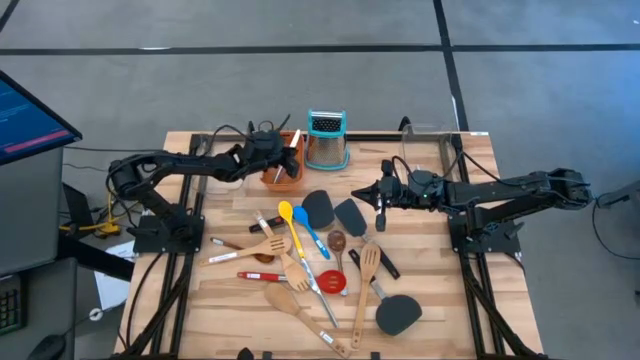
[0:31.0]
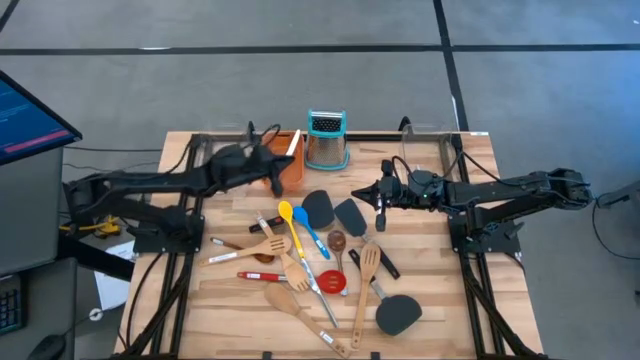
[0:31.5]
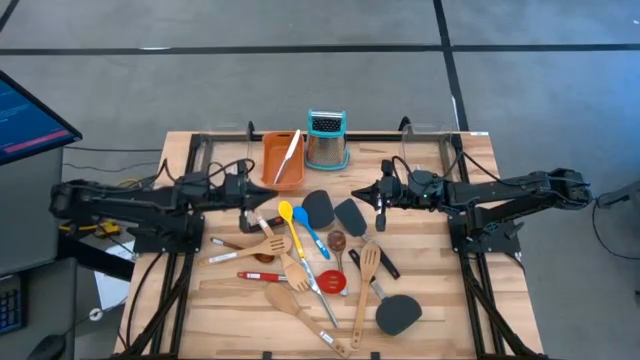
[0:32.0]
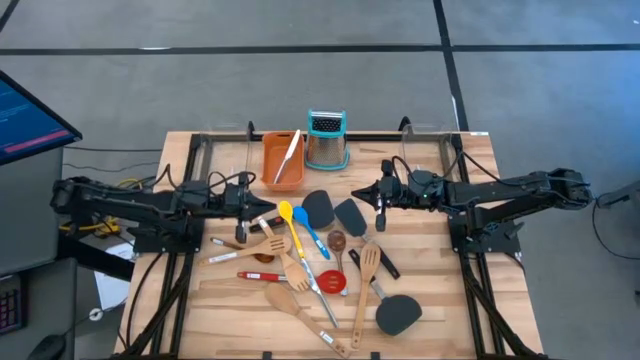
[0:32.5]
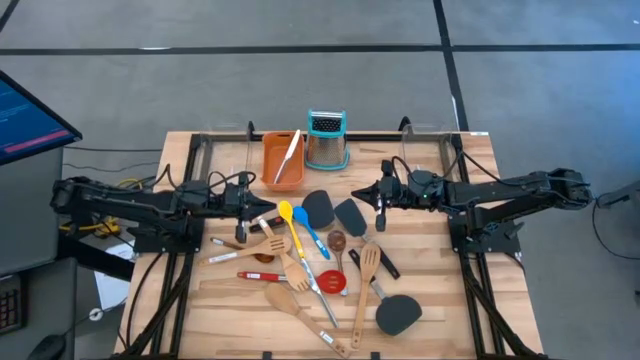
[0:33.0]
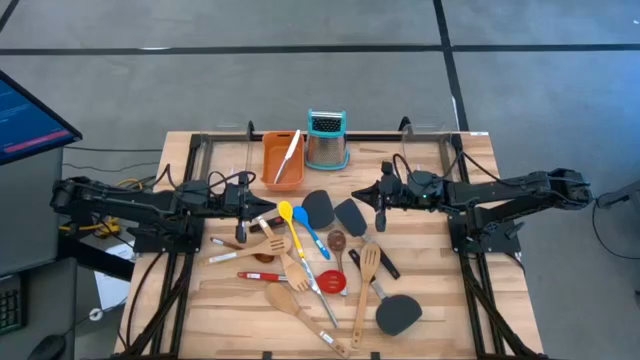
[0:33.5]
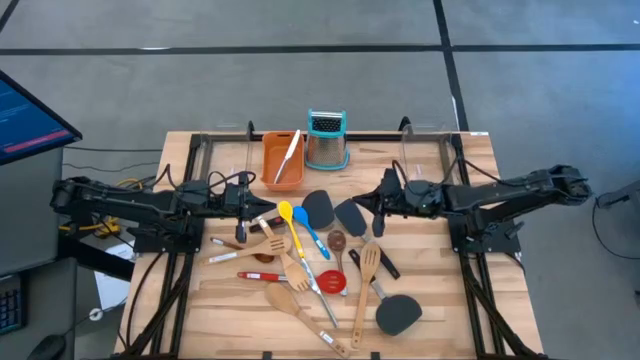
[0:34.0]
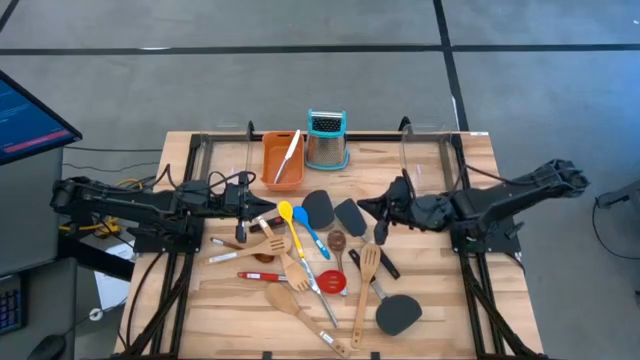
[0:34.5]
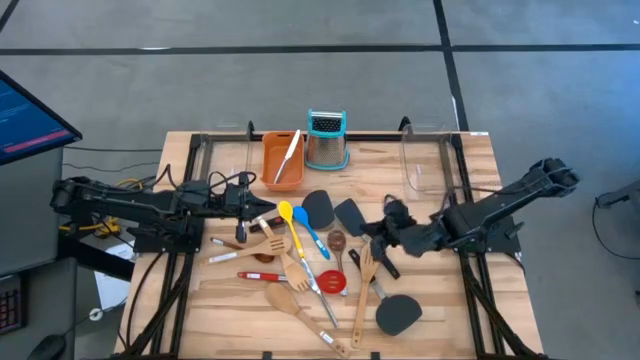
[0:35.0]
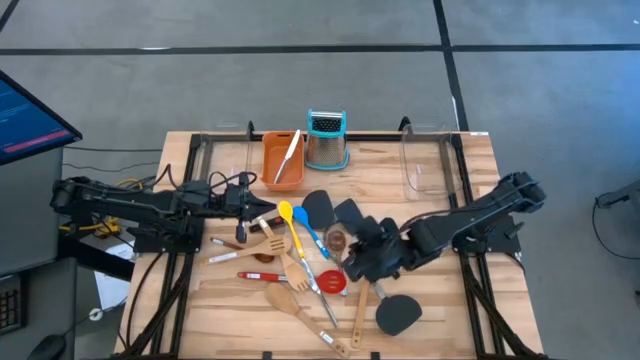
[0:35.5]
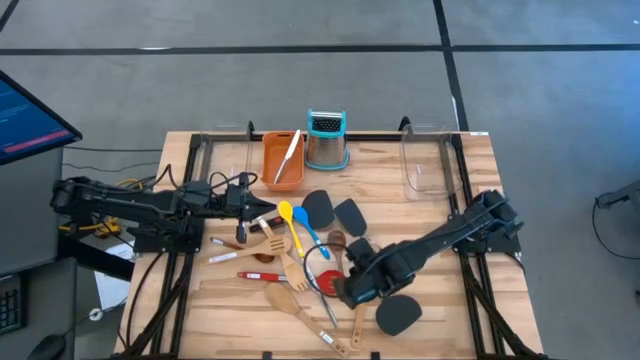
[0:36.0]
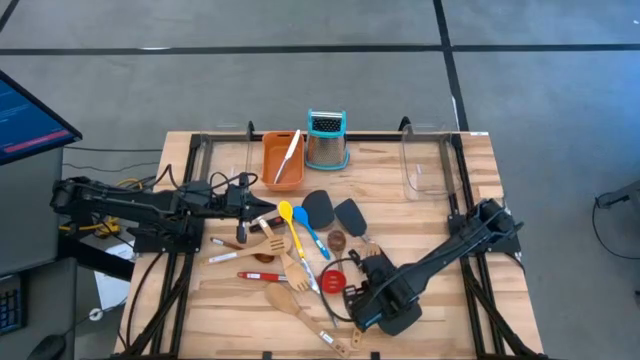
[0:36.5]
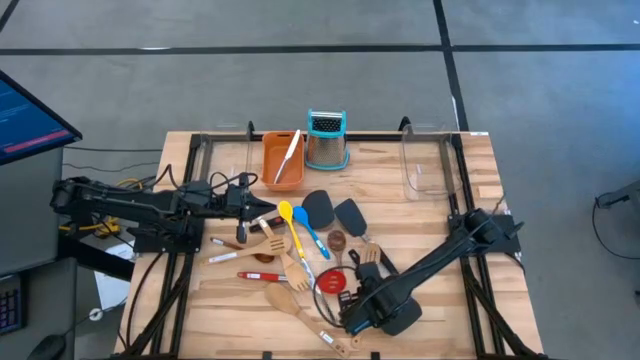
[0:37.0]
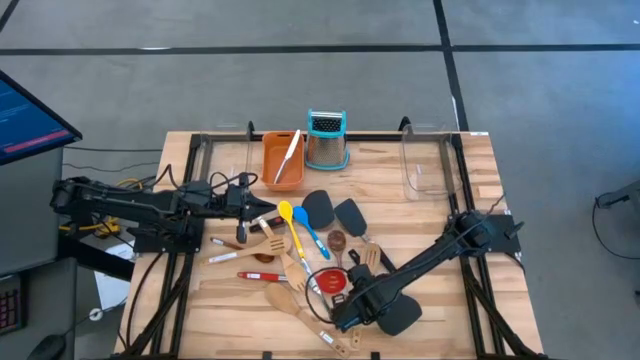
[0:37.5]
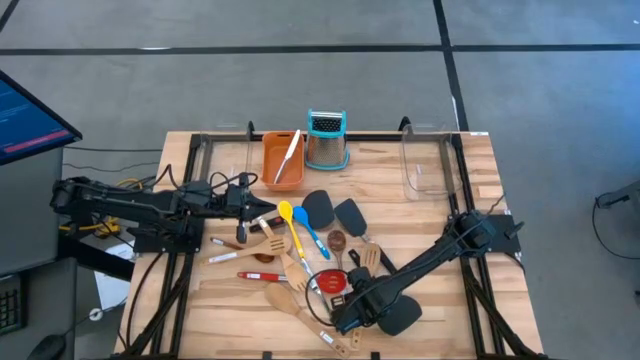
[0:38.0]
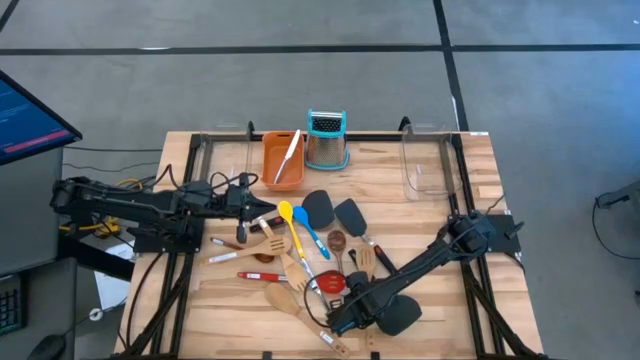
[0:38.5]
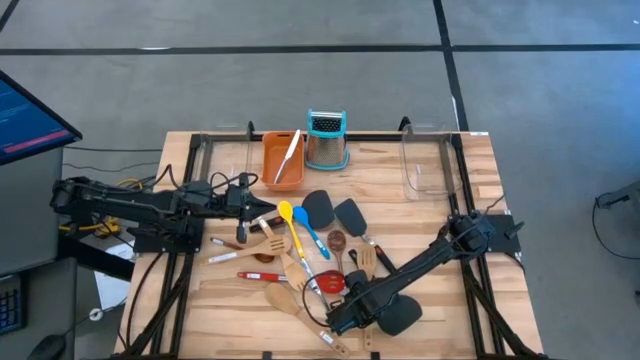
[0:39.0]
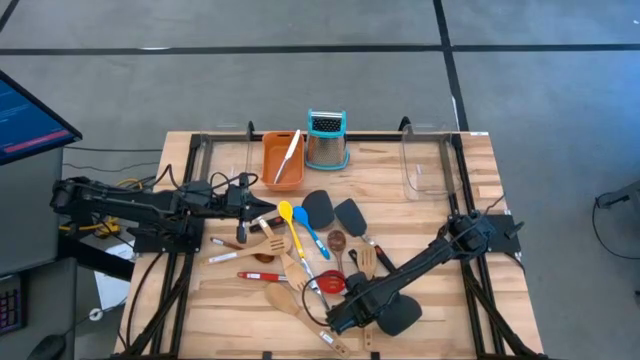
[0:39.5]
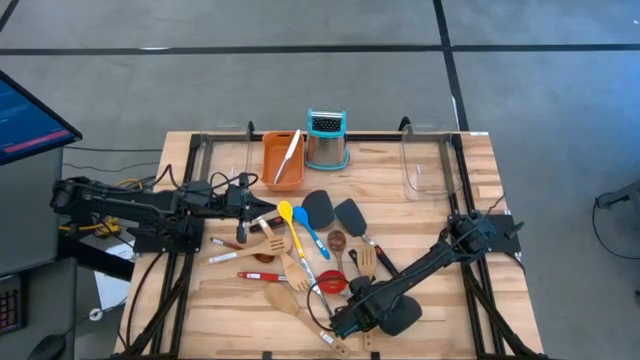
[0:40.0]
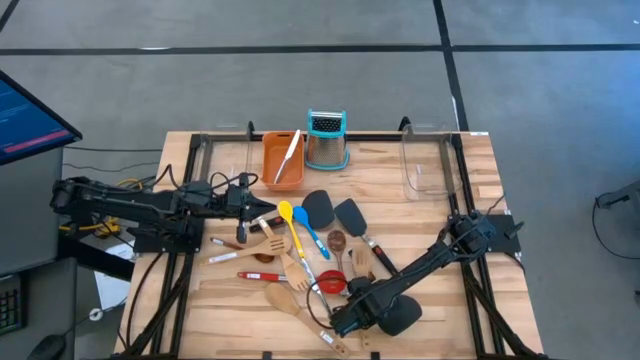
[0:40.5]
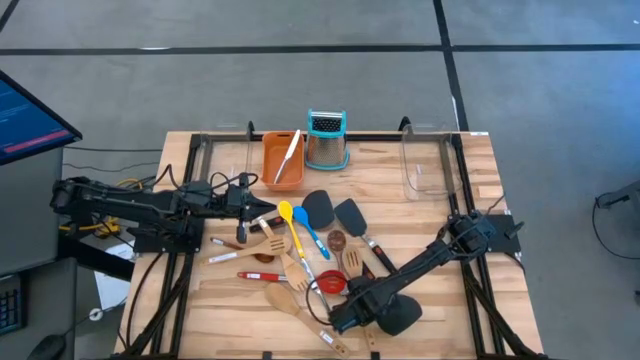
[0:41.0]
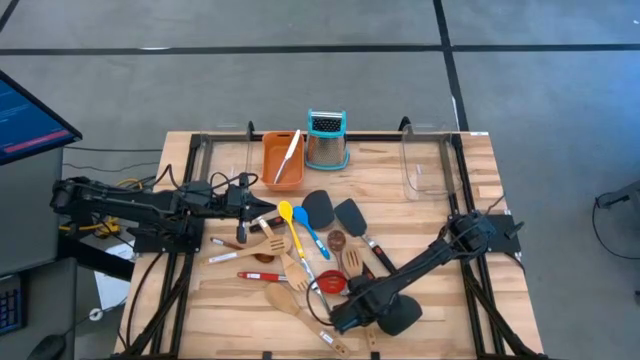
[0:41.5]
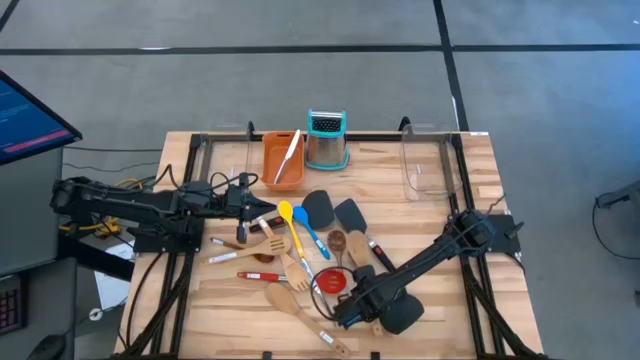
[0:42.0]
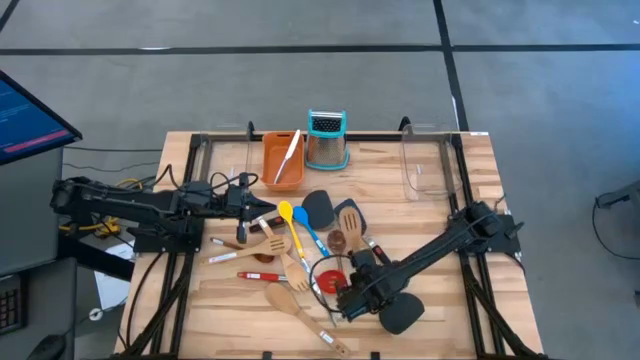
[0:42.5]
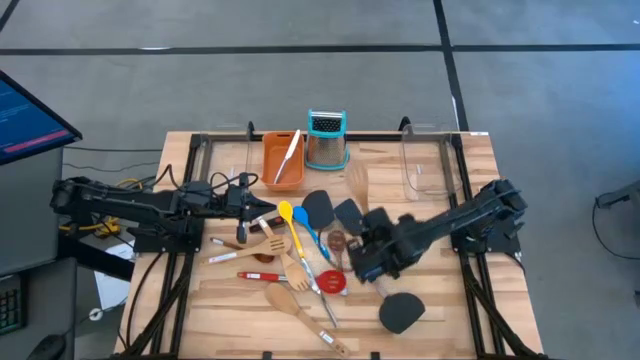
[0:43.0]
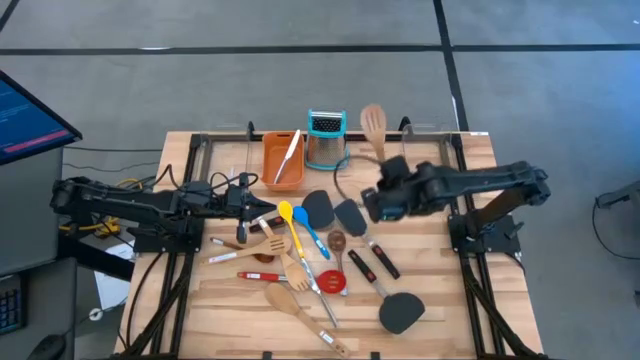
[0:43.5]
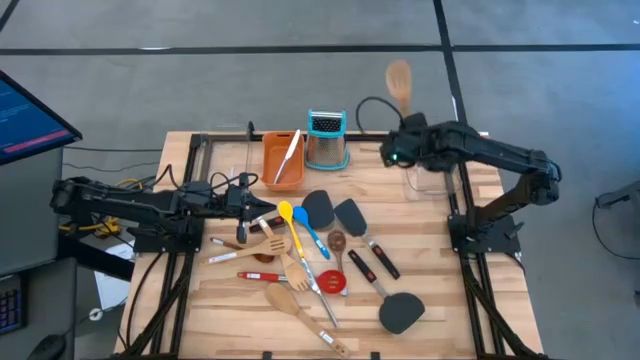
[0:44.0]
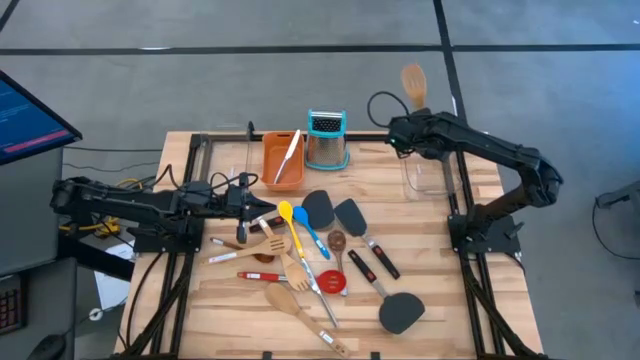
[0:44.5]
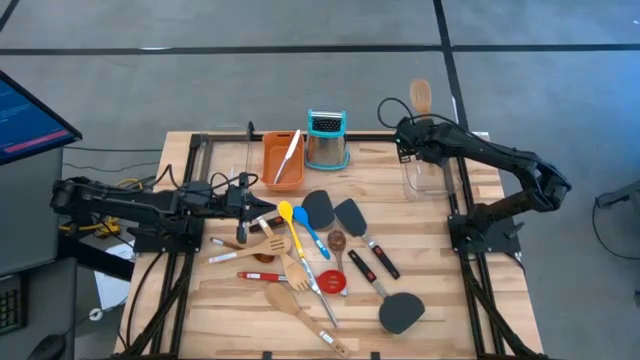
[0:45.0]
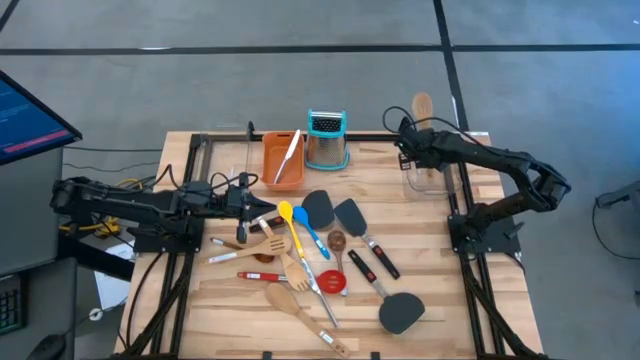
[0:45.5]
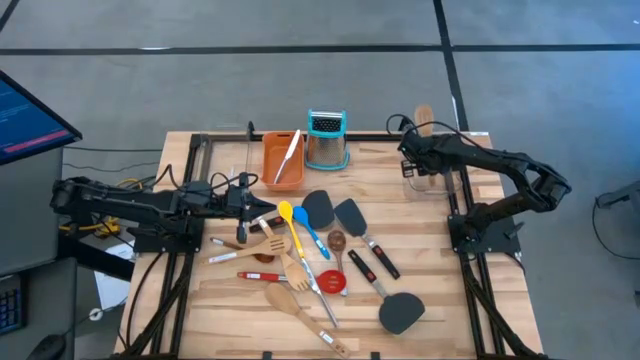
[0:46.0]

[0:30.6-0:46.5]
Task: Pick & Place Kitchen Items
Put the brown wooden spoon into the right transparent bin

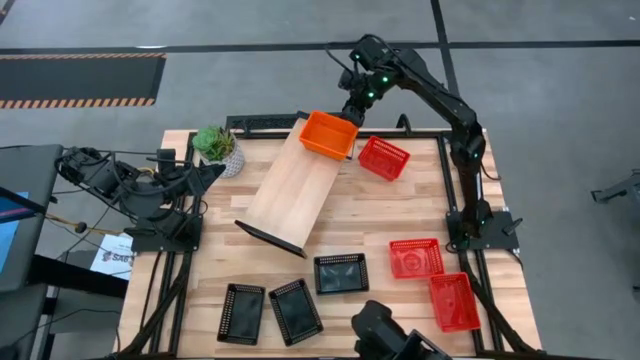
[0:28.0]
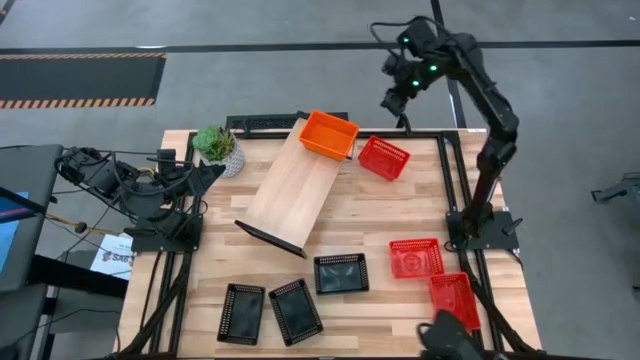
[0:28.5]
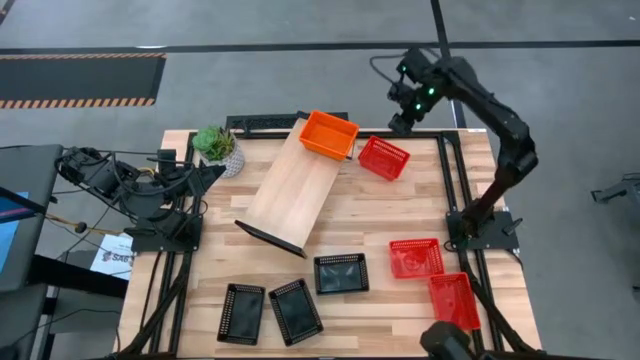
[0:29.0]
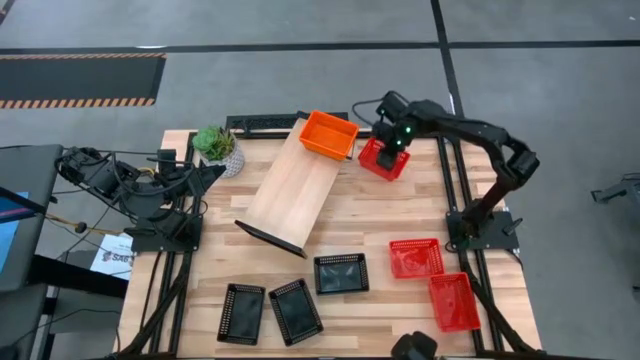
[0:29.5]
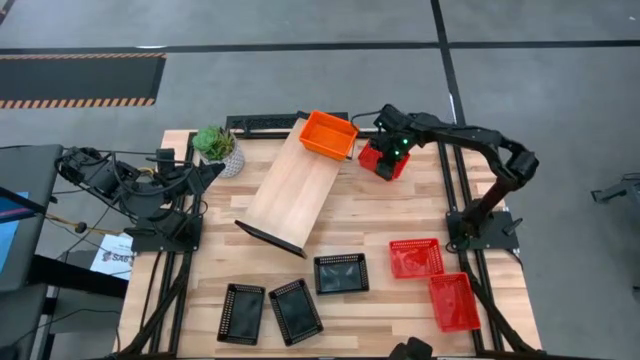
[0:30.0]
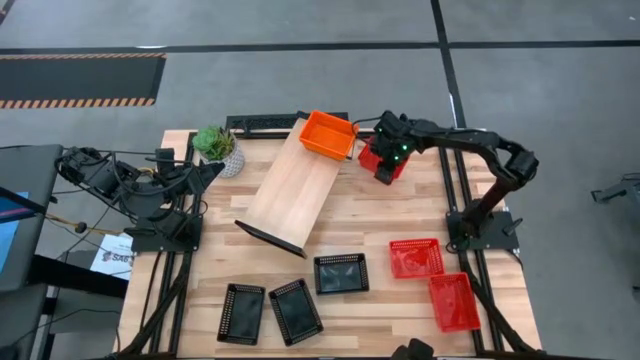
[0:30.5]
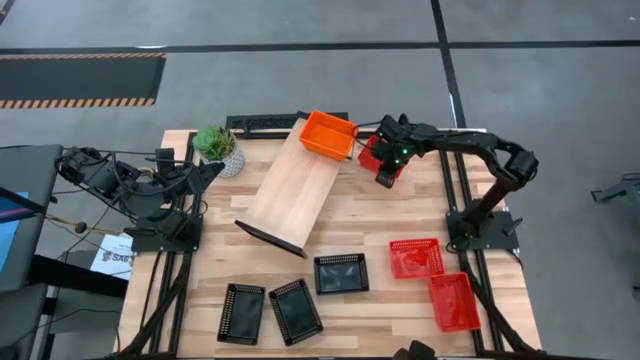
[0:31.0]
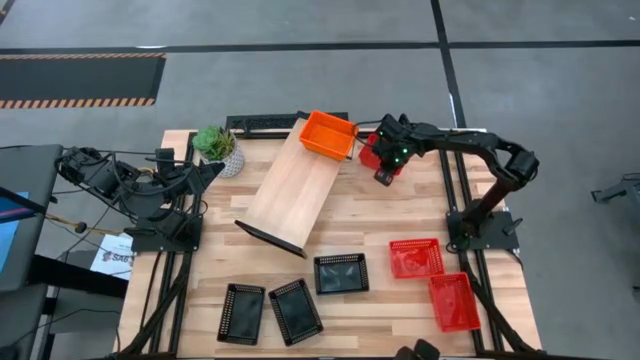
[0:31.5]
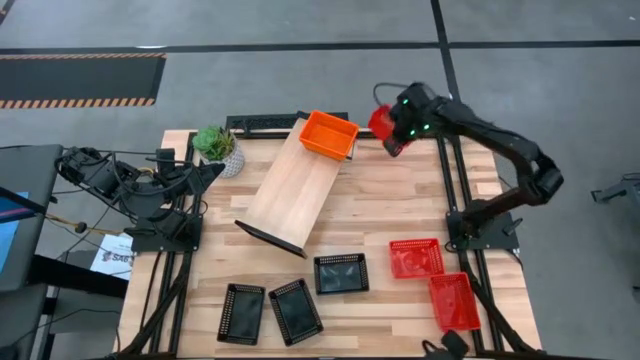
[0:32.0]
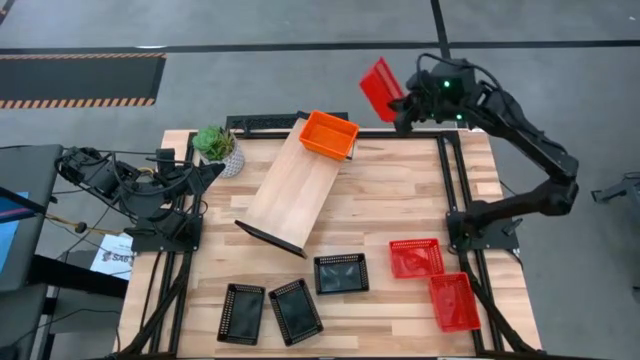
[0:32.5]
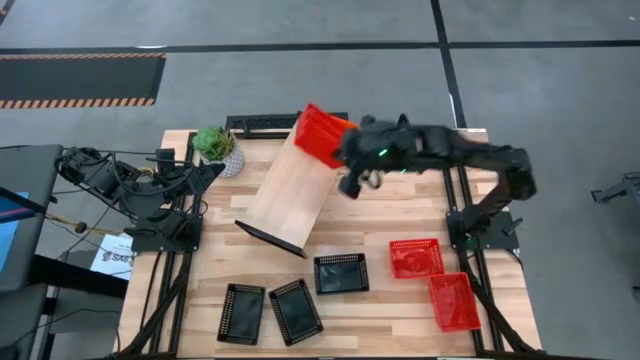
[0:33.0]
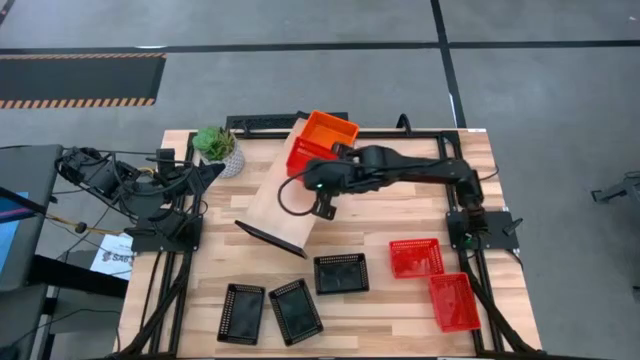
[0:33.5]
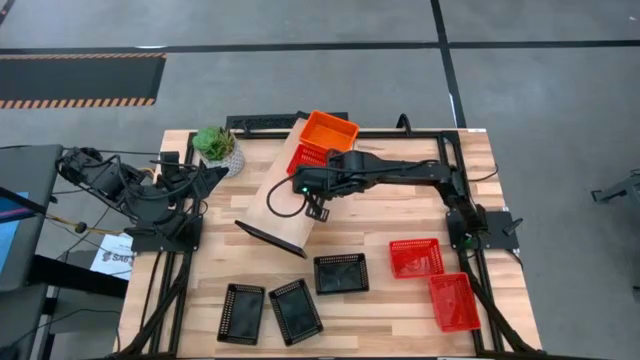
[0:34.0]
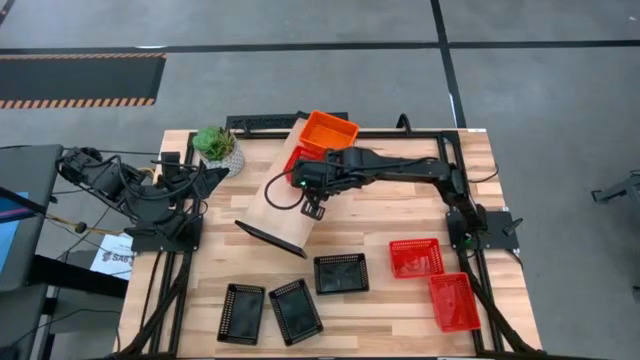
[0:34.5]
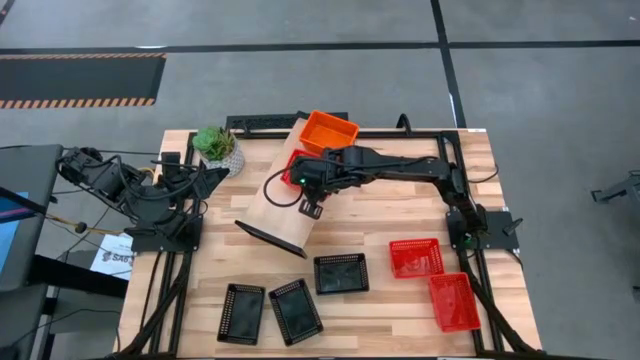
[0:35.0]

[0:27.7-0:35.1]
Task: Stack baskets on shelf by color
Put the top red bin on the shelf
